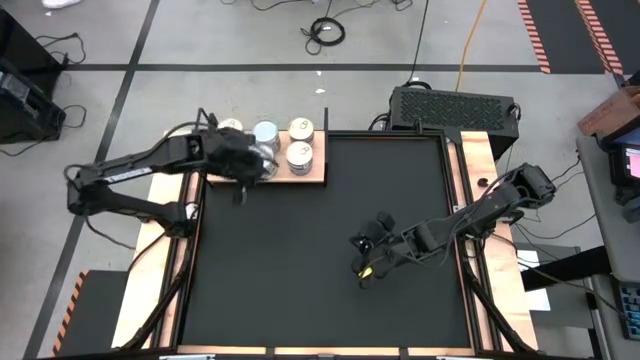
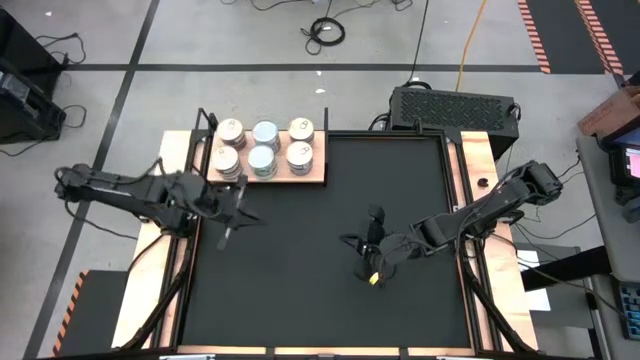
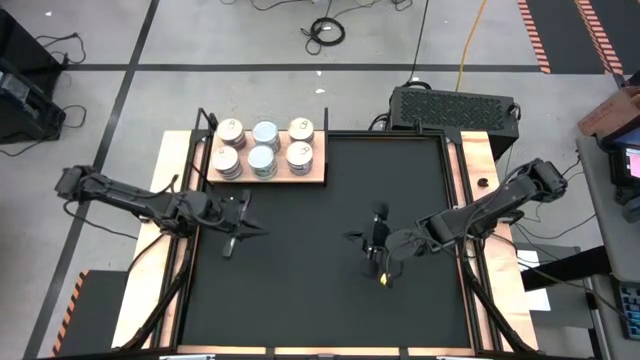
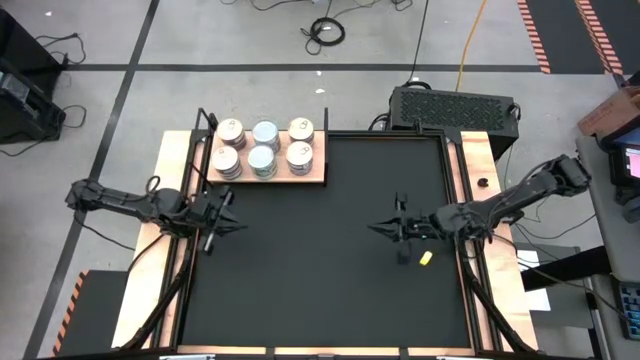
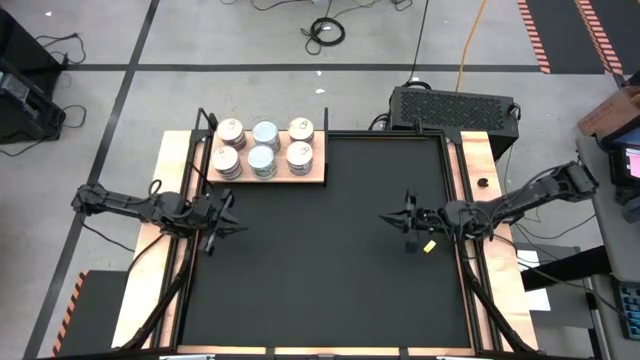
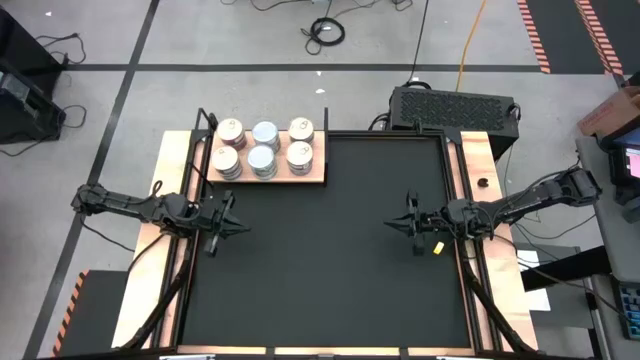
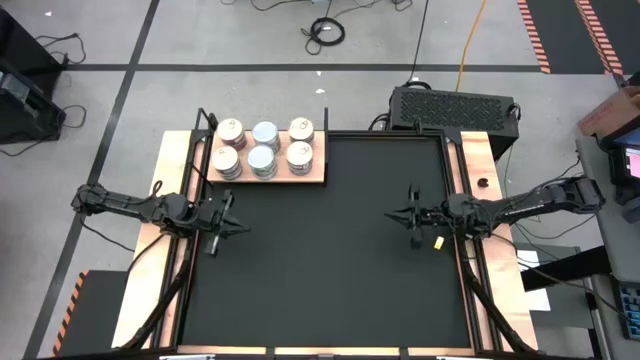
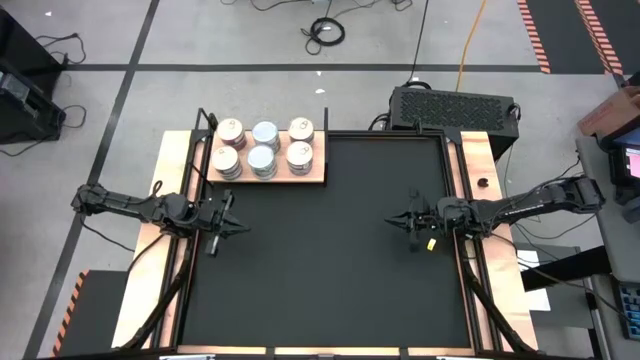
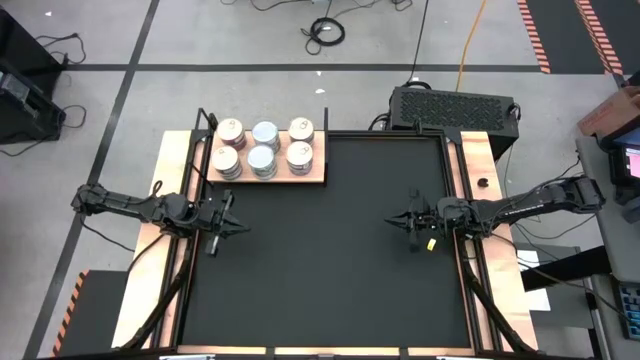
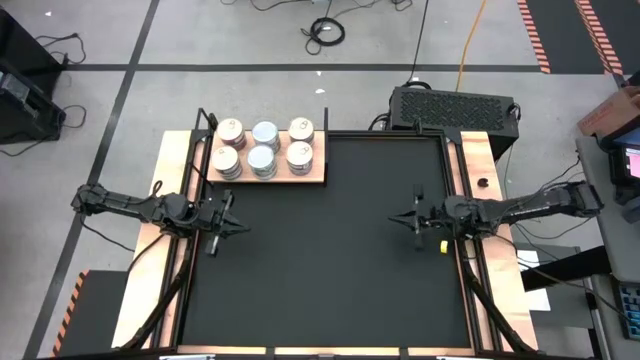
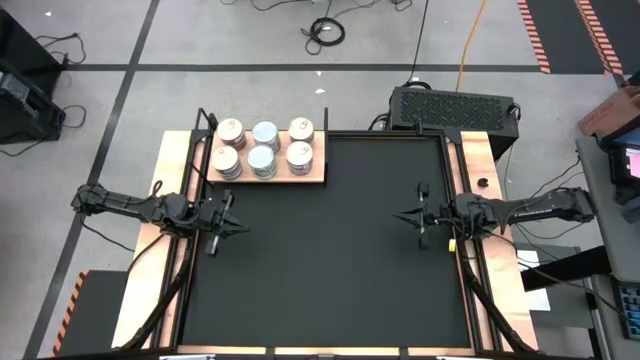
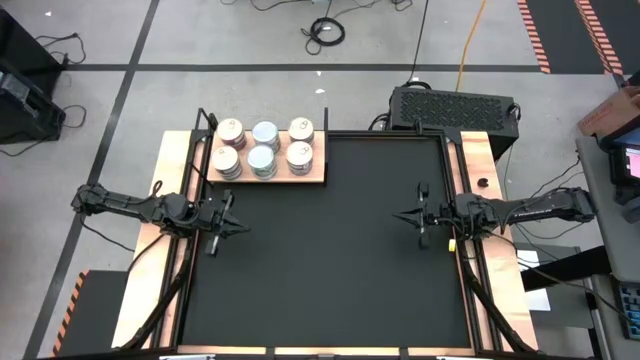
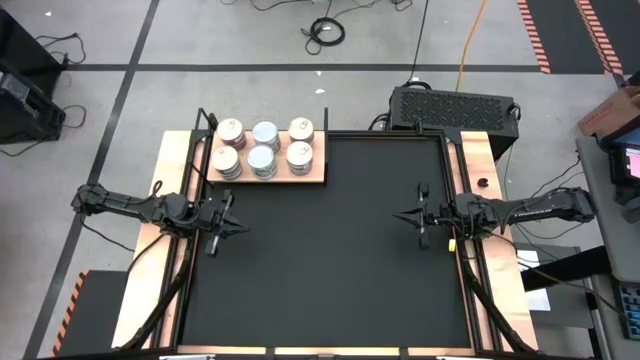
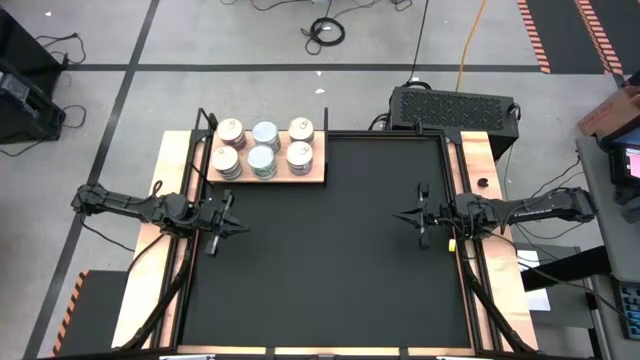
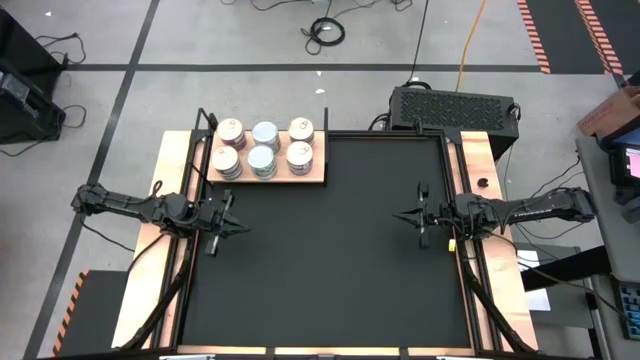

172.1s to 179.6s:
Task: Stack canned seafood by type on shelf
Return to Home Position

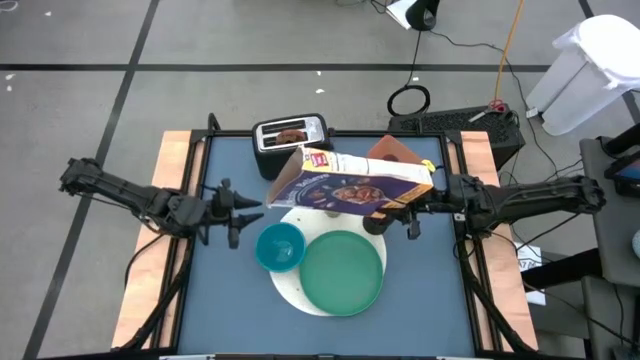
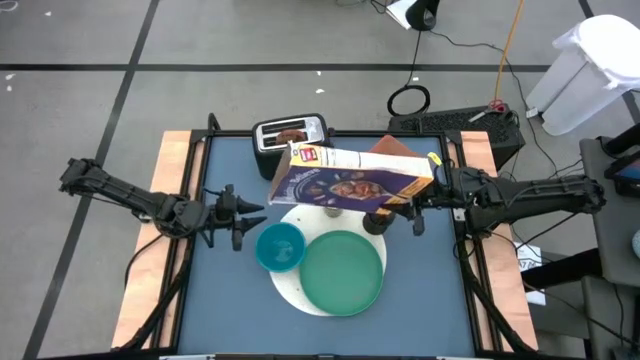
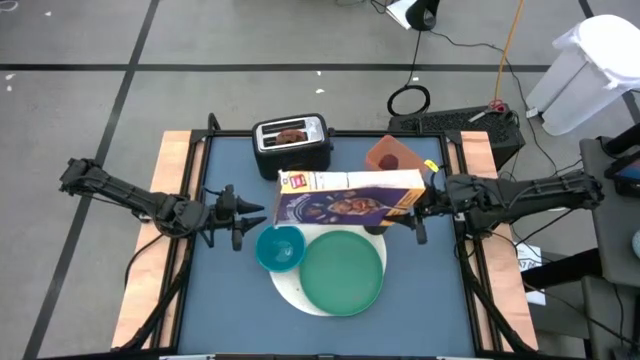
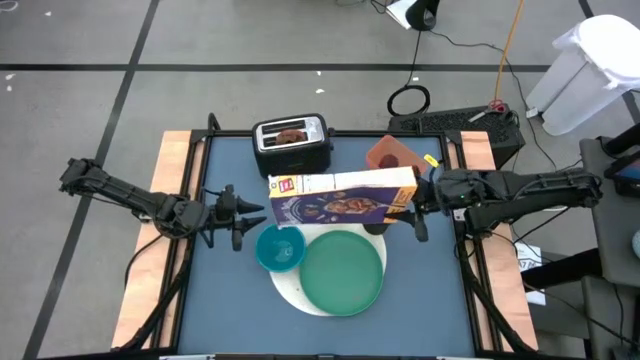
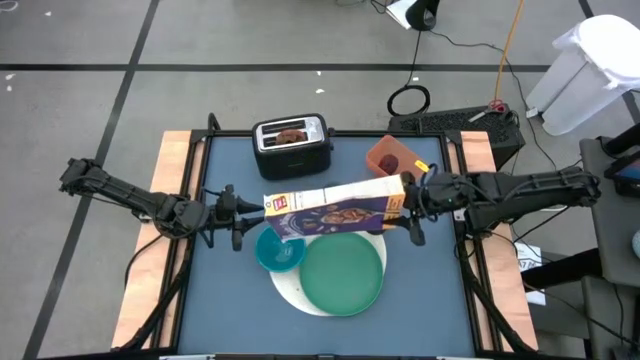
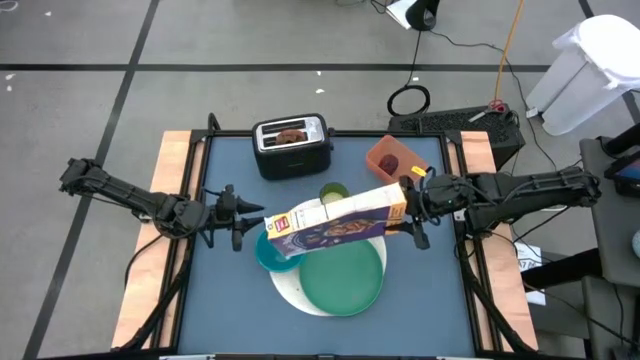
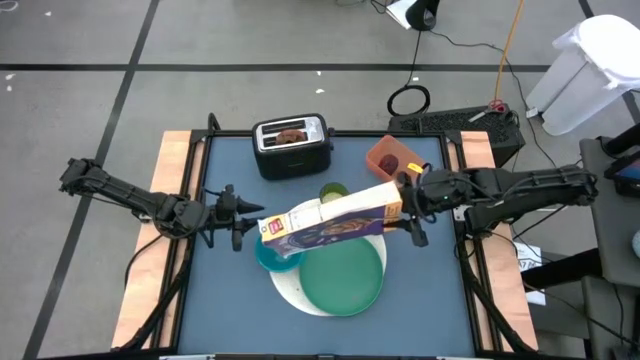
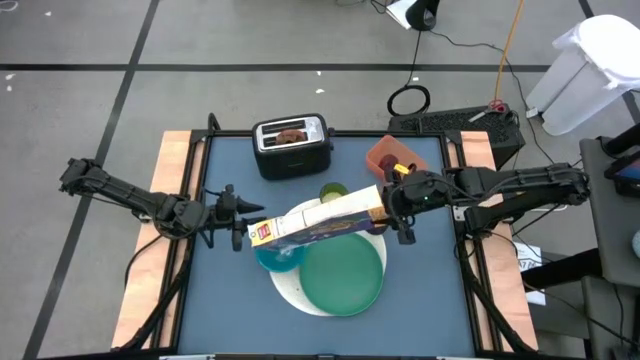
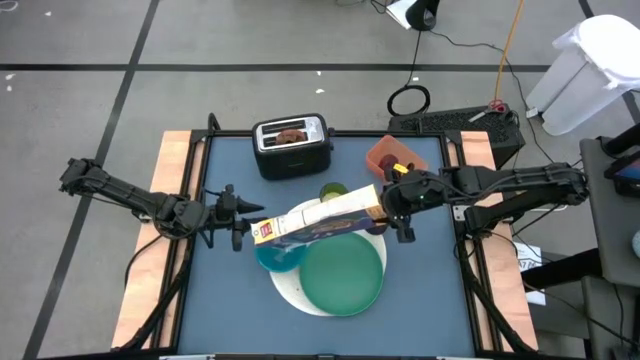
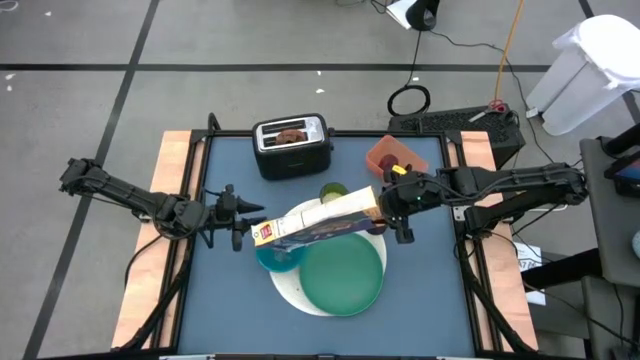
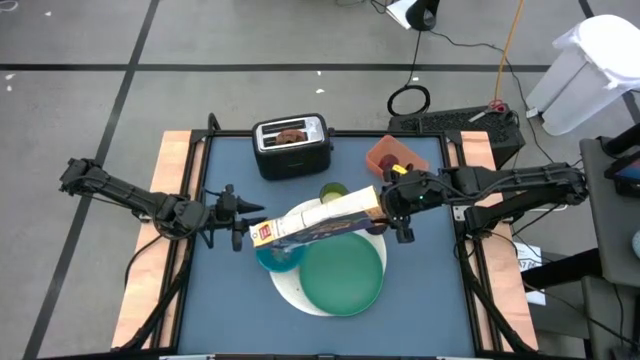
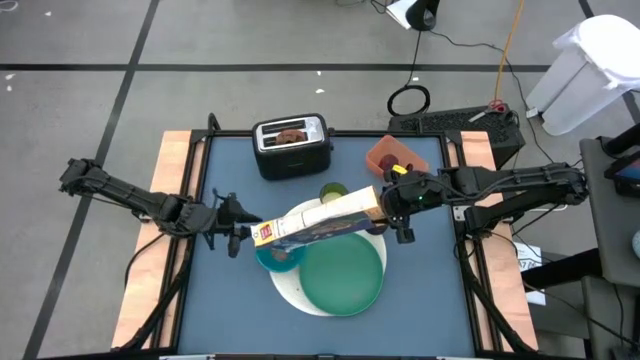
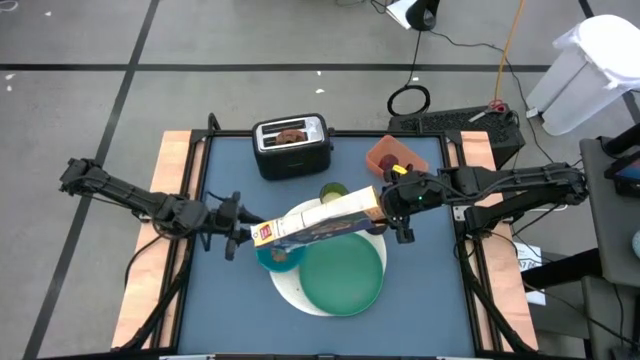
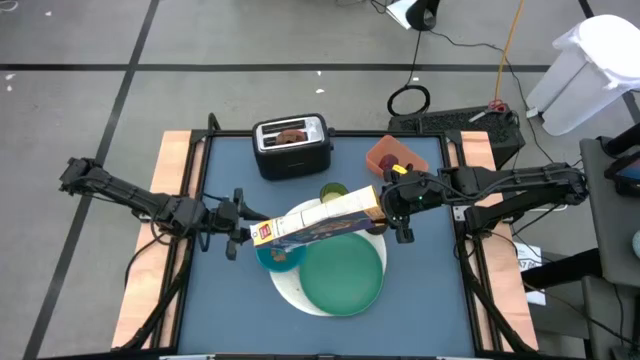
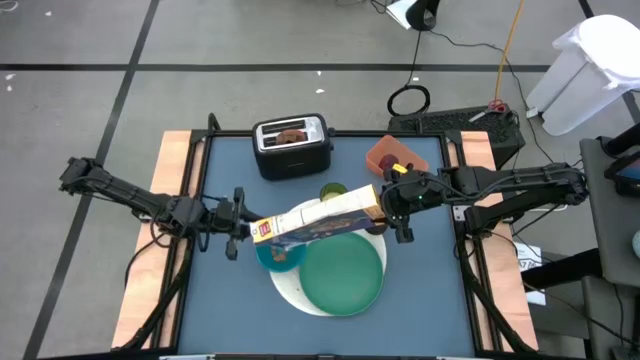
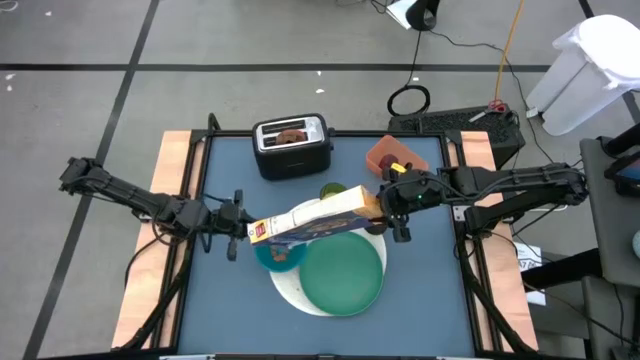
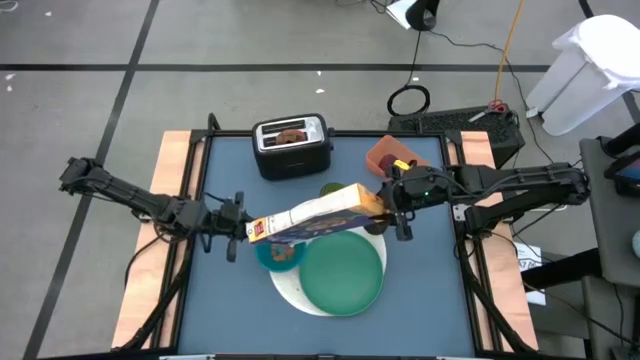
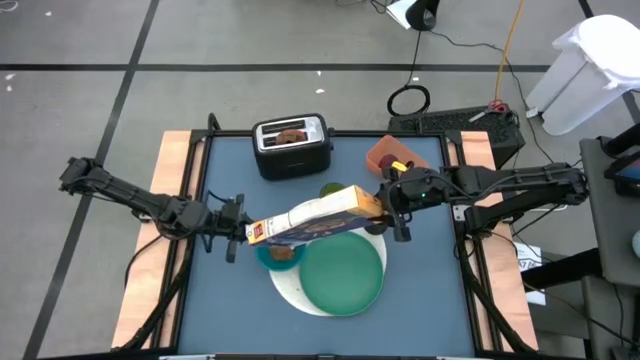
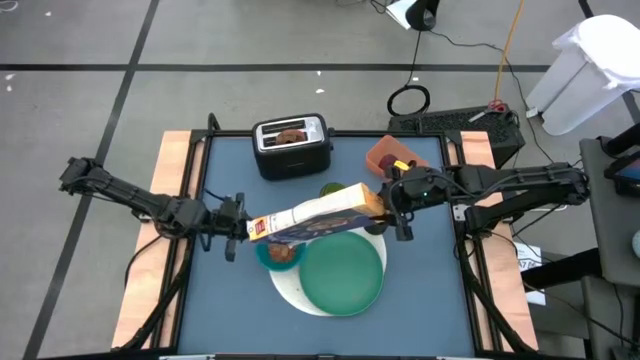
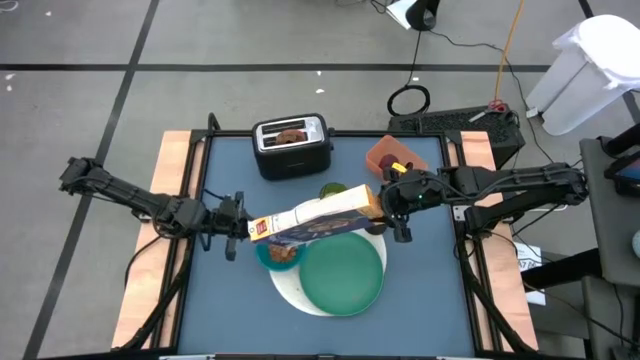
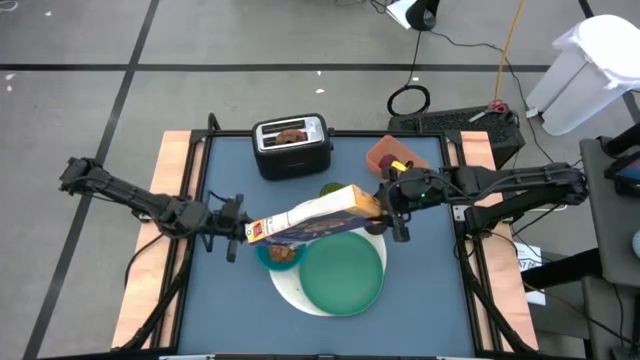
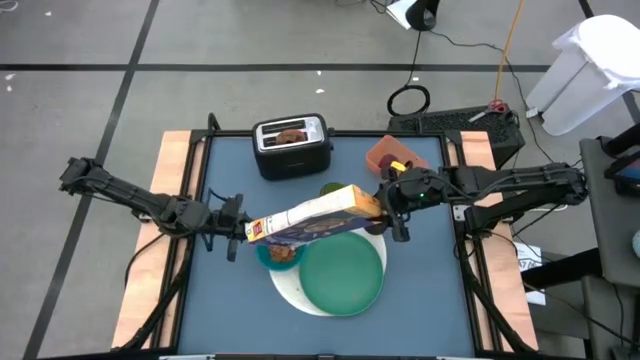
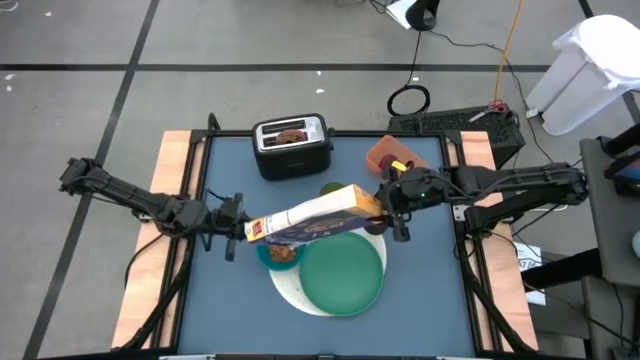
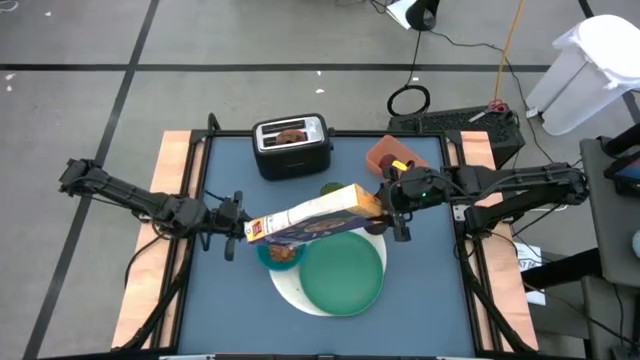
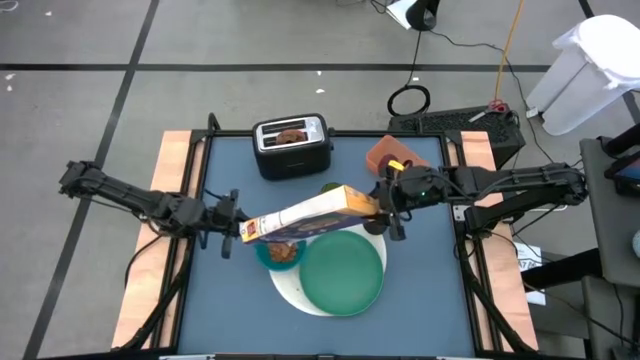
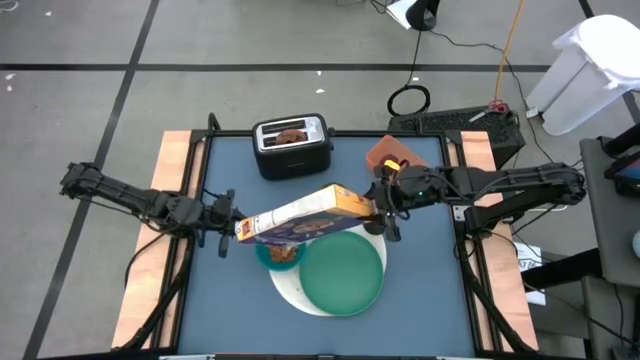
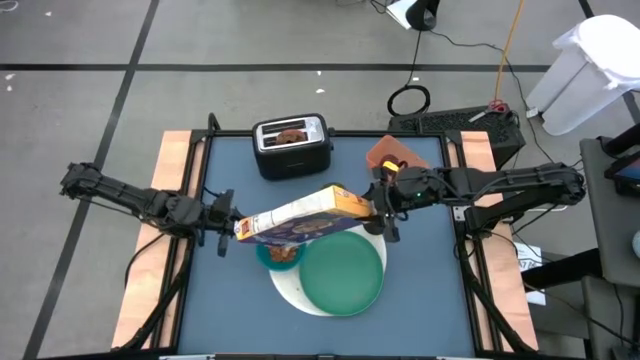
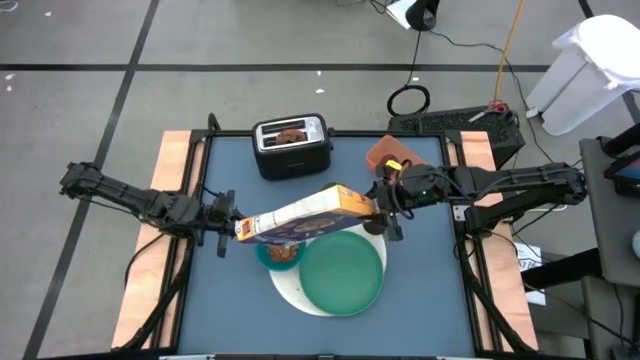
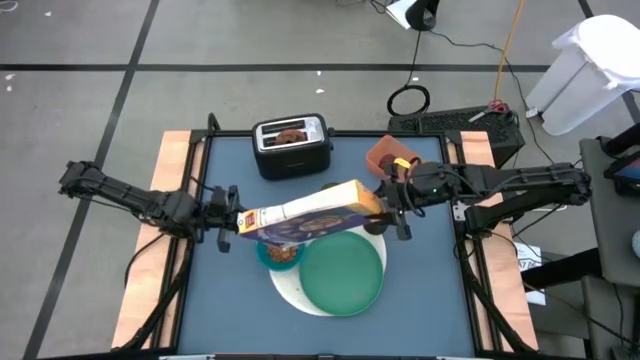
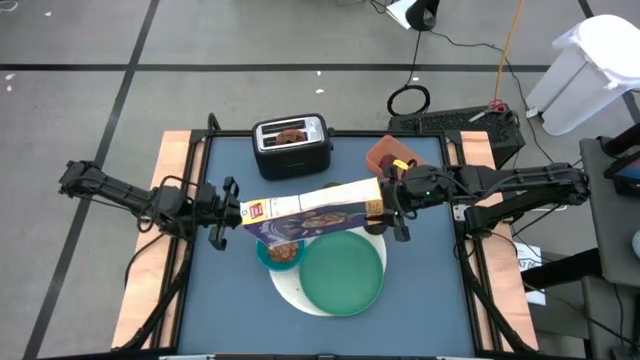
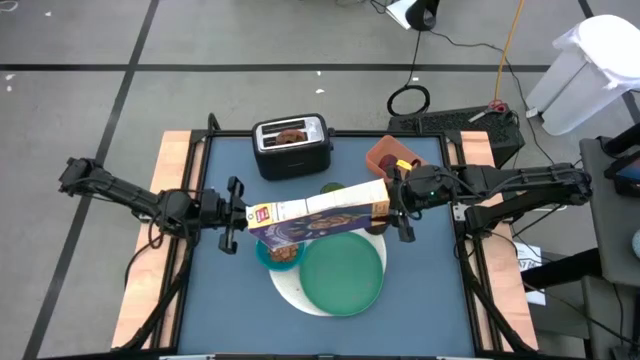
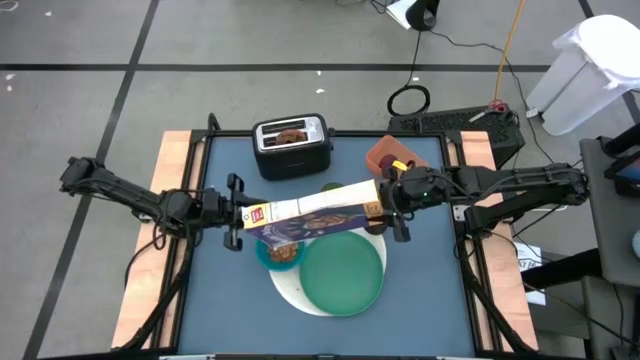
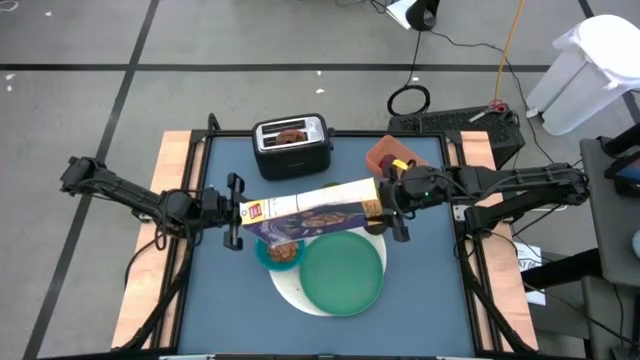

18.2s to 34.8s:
Task: Arrange a breakfast setting
Pour the cereal from the purple cereal box into the blue bowl
